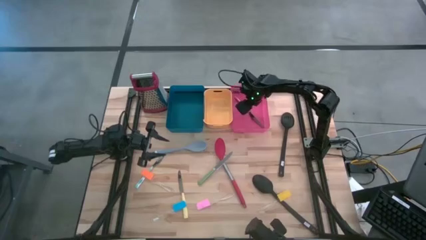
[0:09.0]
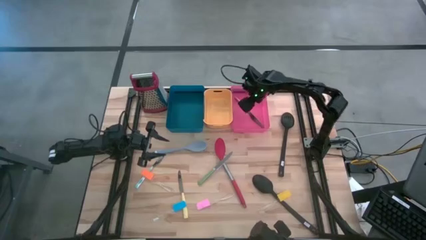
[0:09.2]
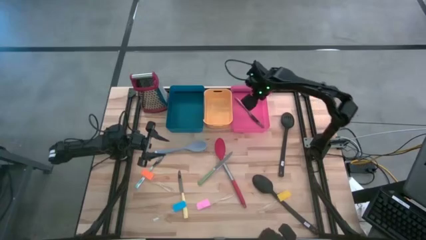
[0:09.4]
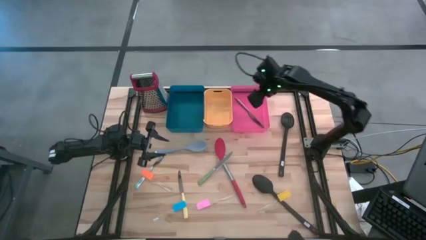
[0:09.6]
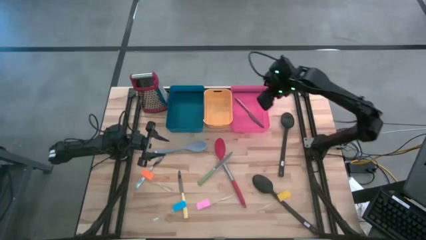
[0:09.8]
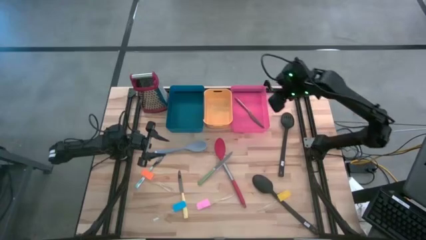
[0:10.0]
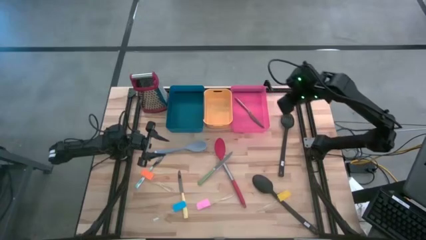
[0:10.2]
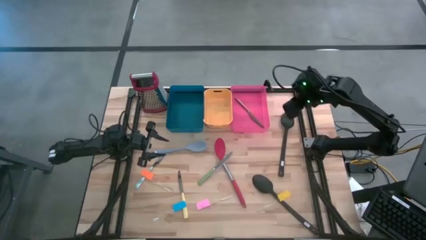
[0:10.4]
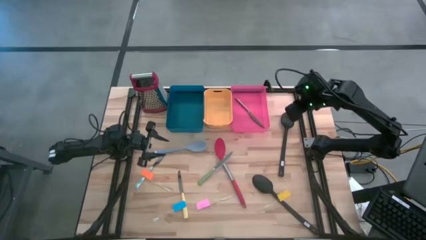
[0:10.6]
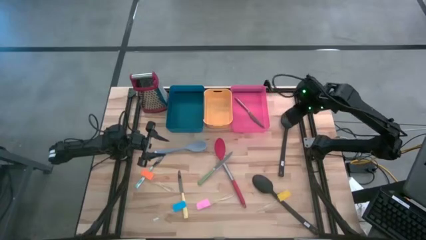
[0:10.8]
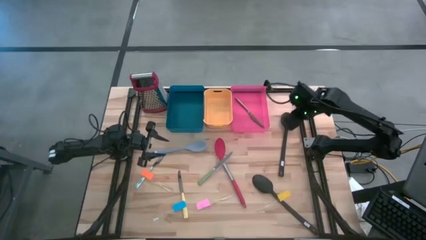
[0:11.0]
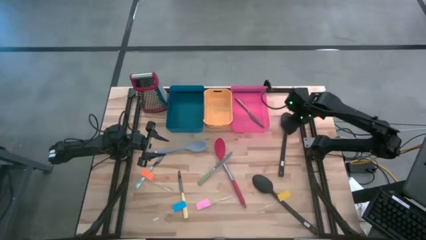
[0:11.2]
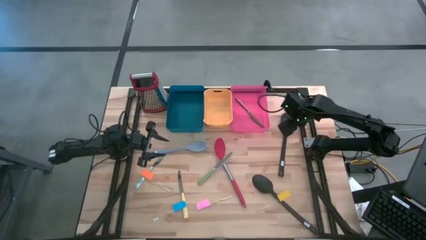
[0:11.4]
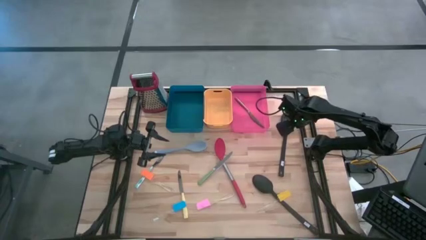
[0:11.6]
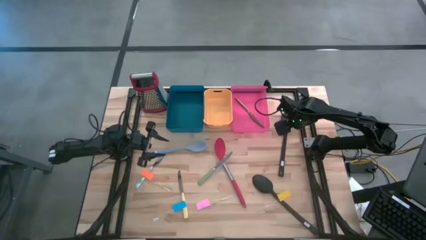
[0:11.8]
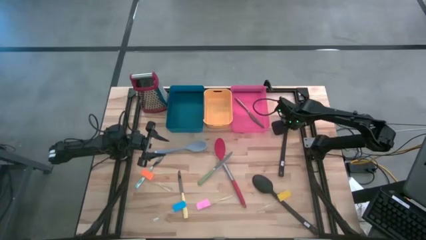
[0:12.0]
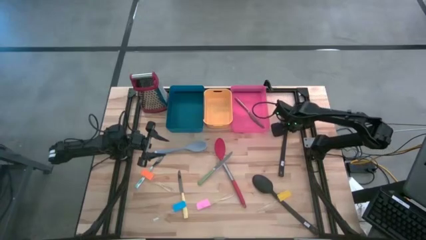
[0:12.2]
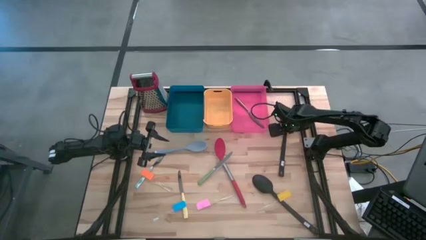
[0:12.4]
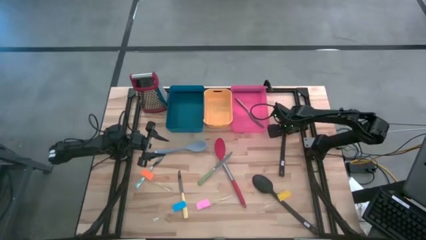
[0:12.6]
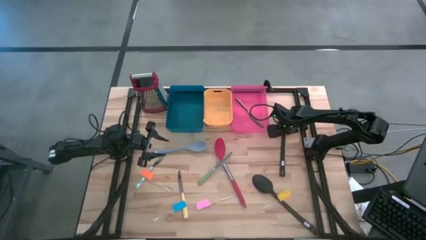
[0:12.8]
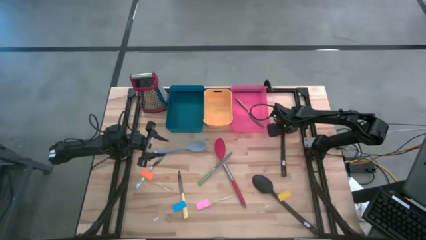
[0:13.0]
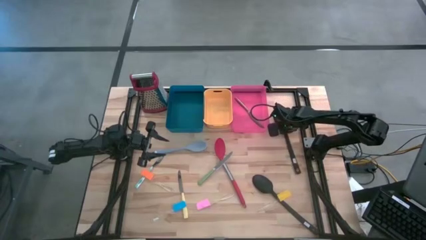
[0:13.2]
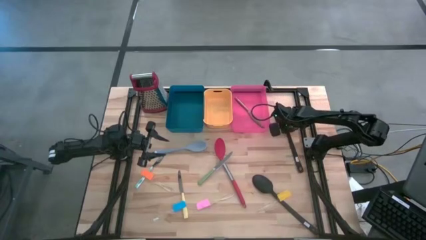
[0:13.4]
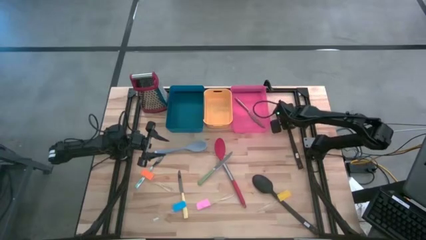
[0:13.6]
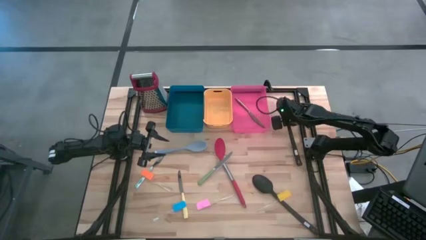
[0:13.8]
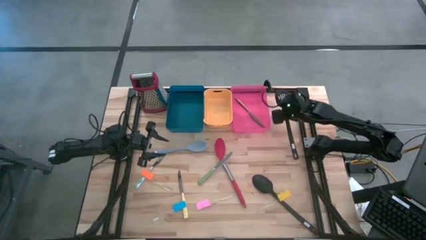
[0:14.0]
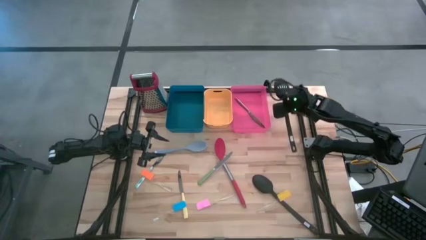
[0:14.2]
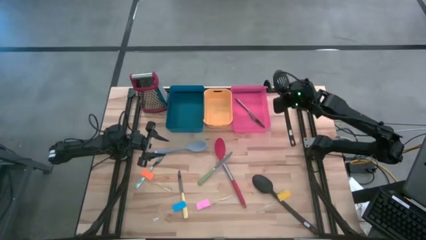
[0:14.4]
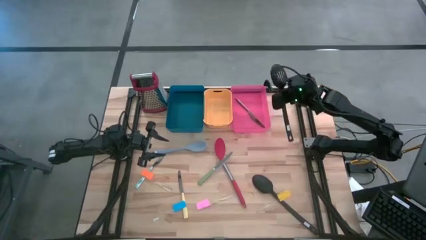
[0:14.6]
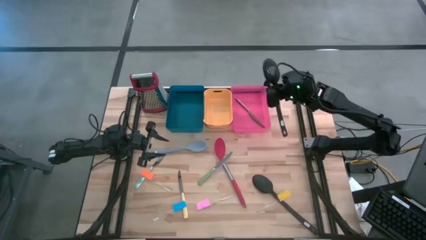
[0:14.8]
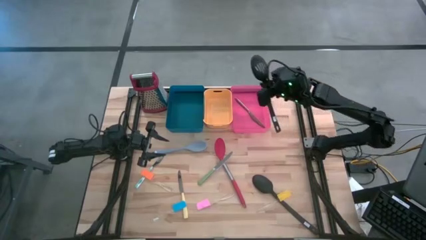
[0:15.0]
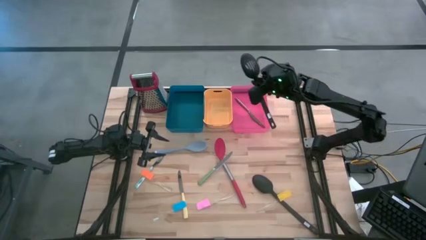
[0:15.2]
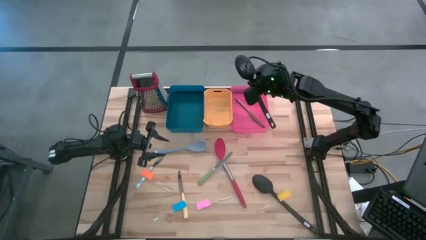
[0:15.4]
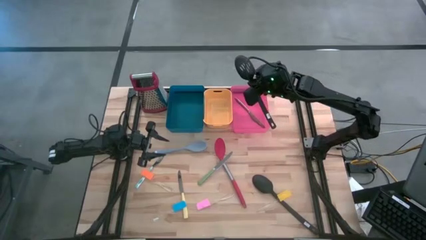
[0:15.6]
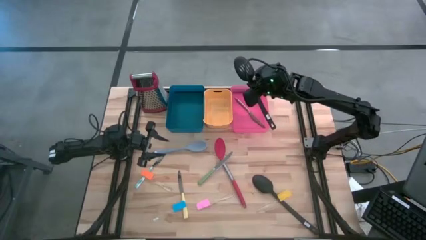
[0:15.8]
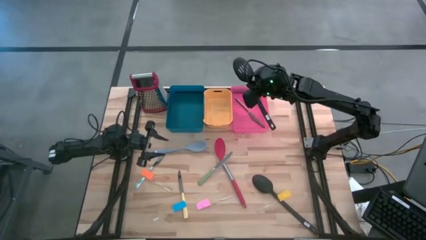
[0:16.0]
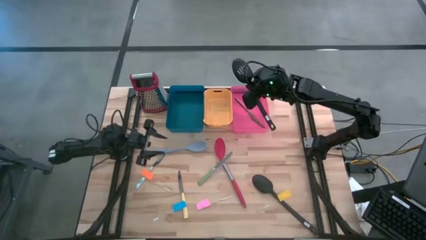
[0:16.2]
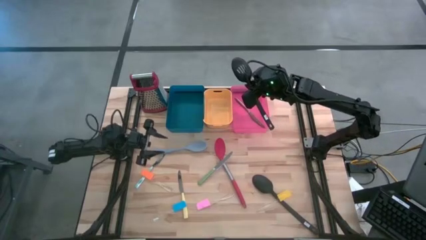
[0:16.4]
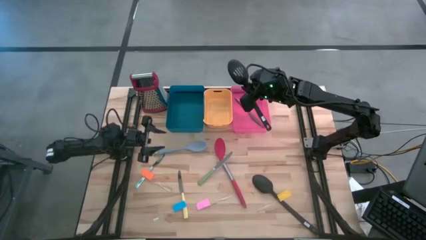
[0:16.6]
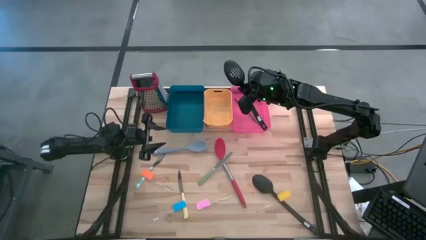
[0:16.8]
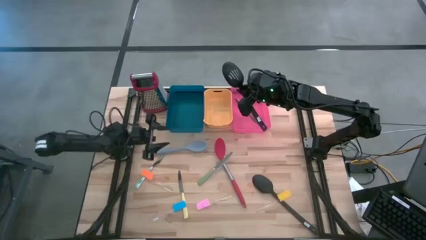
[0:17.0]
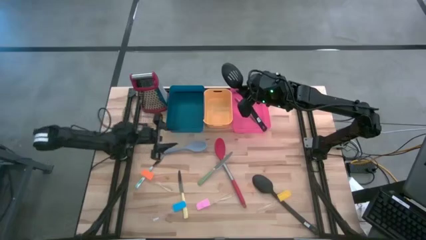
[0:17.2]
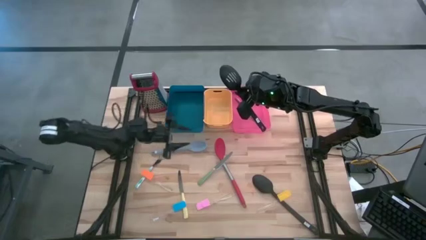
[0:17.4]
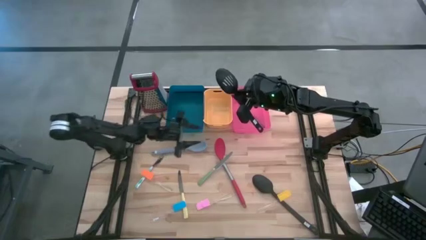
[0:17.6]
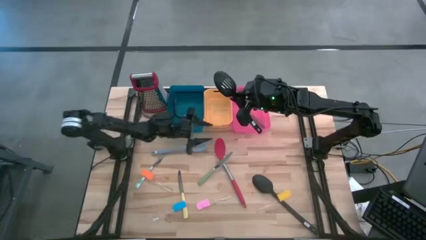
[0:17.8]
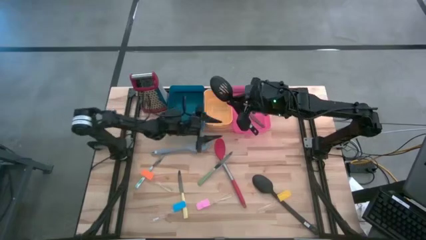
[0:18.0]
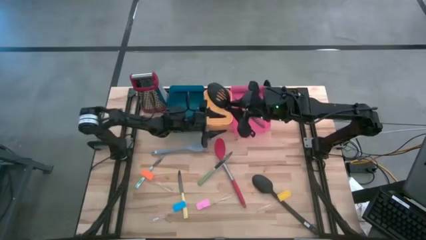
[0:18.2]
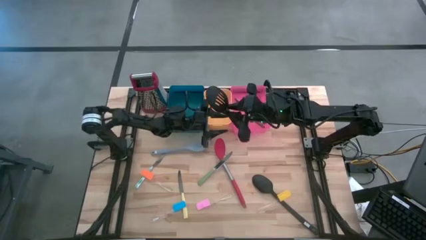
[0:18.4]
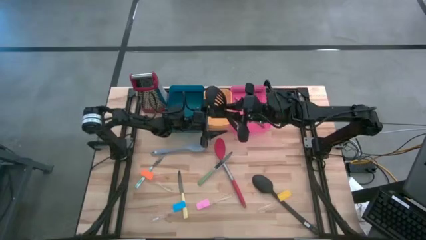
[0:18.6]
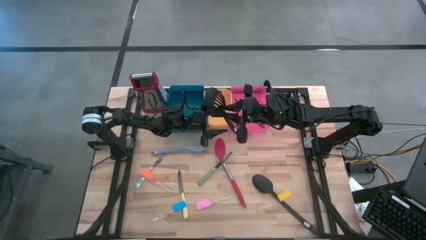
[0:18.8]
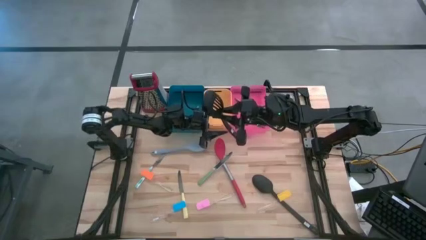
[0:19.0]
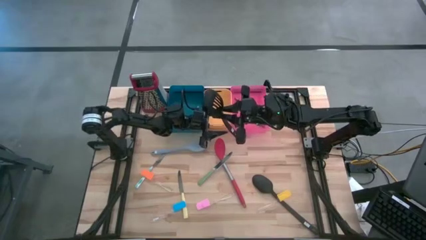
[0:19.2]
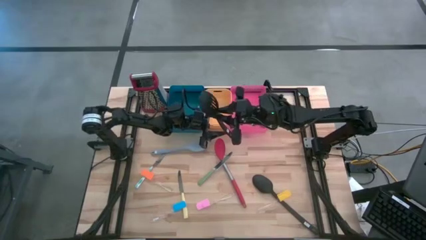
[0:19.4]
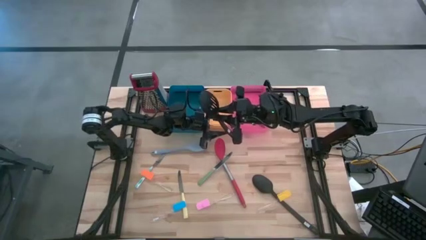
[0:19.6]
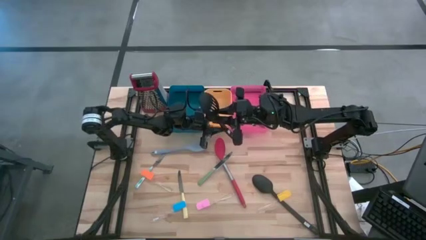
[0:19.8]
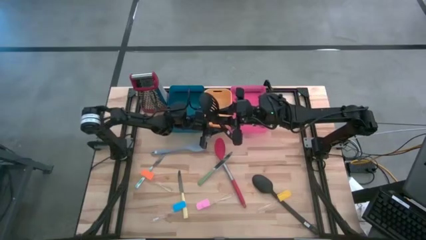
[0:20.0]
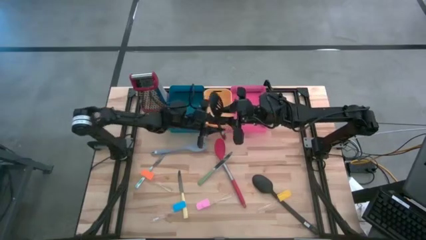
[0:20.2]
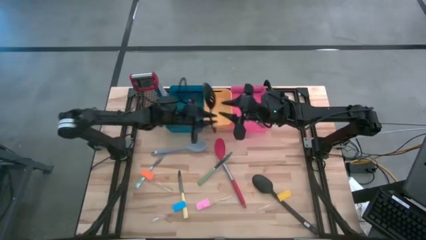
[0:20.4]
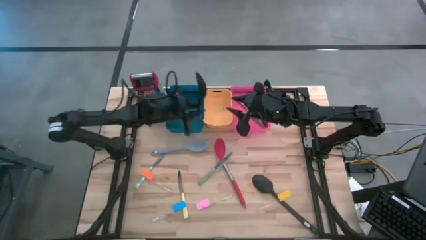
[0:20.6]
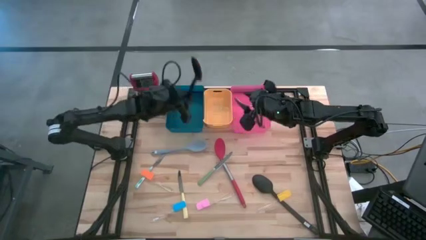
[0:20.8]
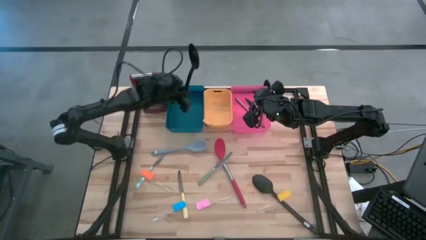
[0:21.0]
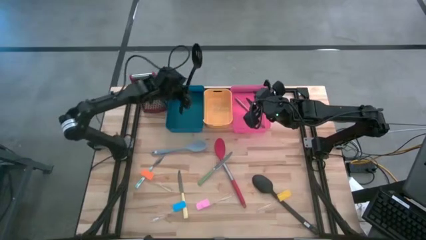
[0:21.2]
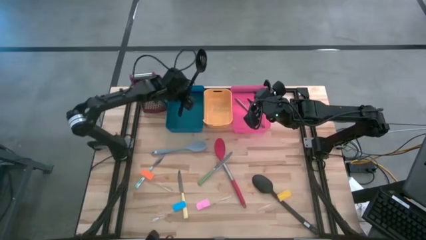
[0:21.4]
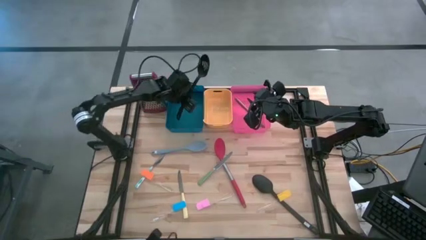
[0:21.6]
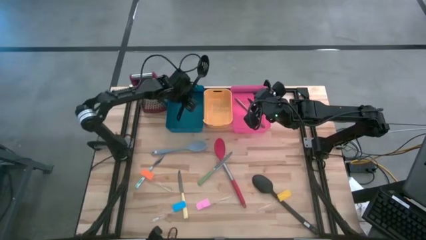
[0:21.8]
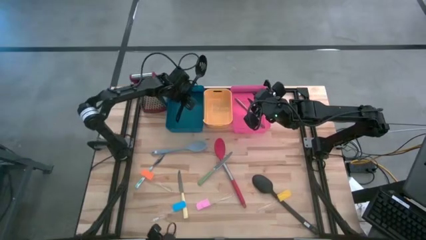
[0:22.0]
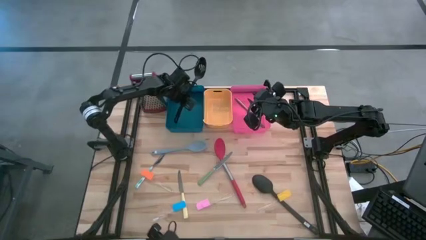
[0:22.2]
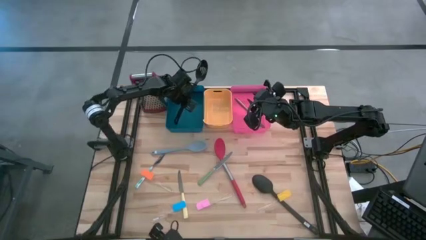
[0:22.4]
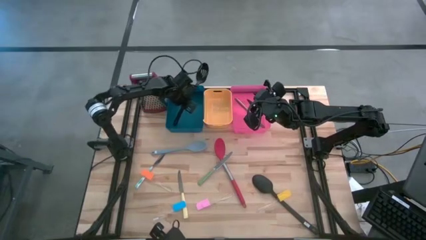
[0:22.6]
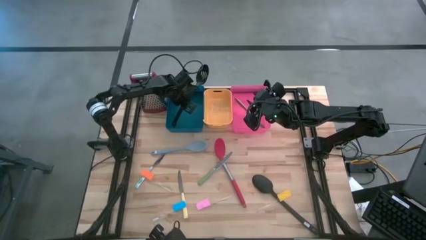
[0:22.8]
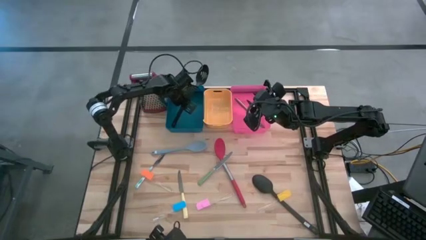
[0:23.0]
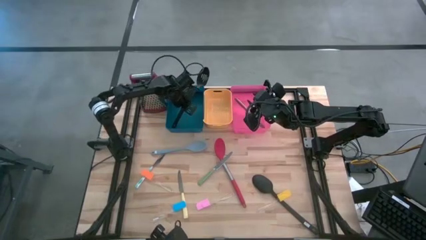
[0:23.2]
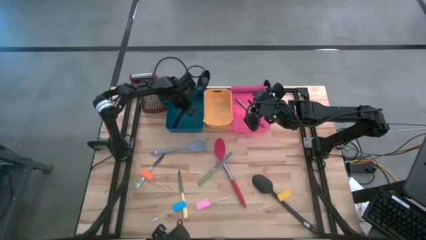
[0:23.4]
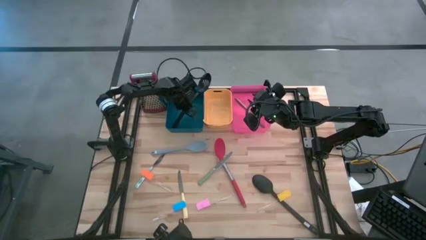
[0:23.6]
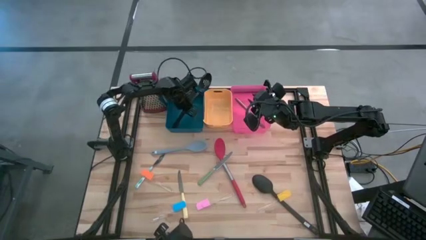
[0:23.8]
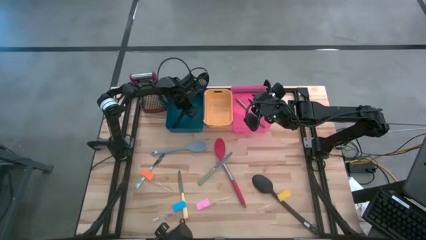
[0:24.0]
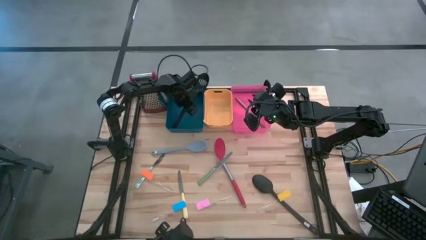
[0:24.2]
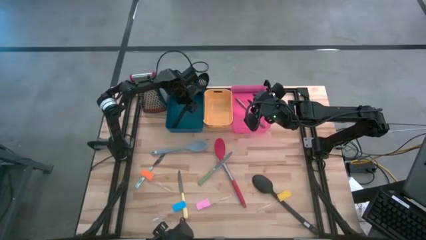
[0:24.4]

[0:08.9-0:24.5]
Task: Pick & Place Kitchen Items
Put the top black serving spoon into the blue bin
